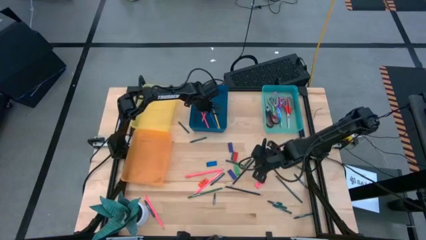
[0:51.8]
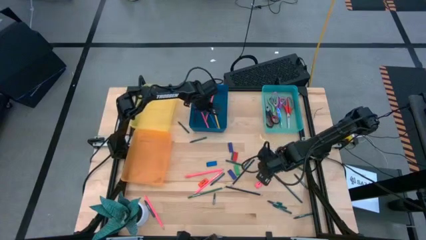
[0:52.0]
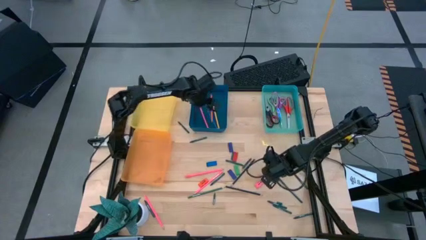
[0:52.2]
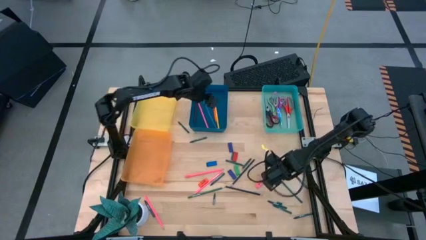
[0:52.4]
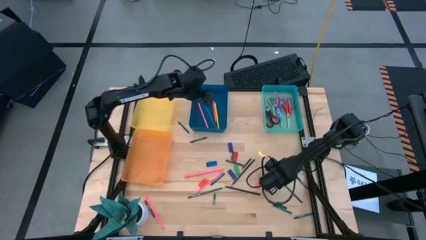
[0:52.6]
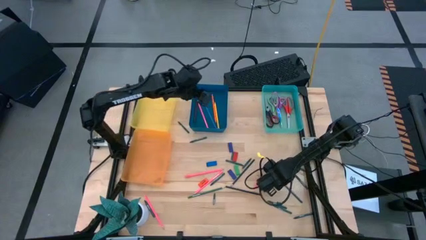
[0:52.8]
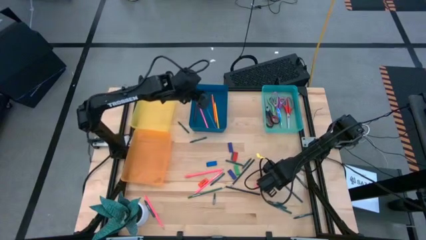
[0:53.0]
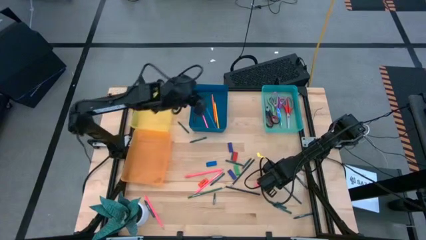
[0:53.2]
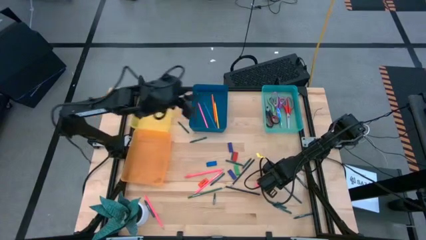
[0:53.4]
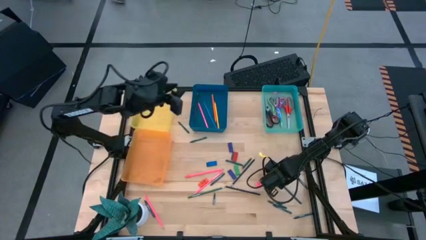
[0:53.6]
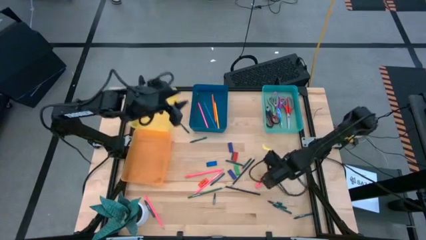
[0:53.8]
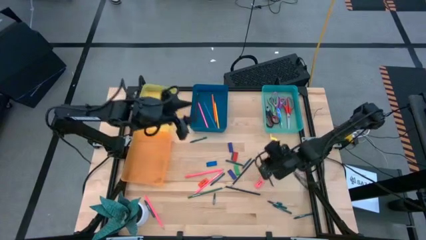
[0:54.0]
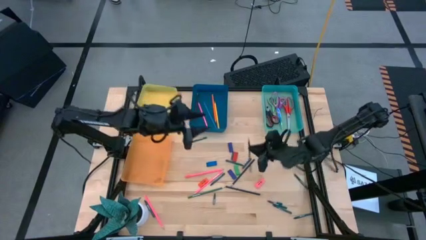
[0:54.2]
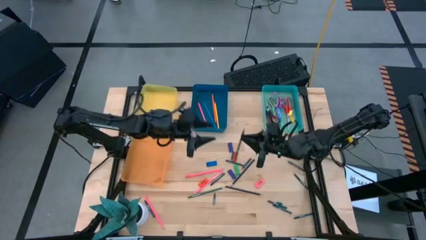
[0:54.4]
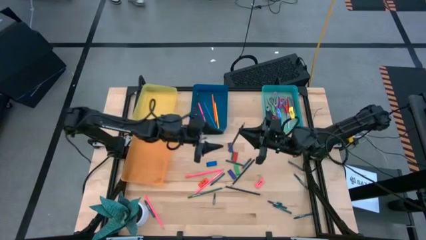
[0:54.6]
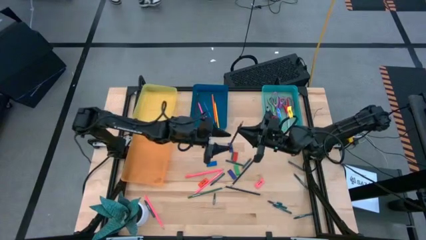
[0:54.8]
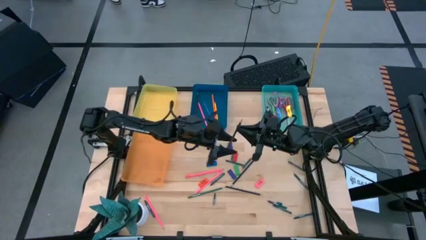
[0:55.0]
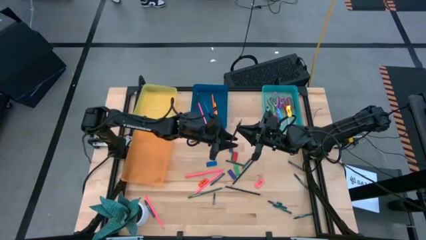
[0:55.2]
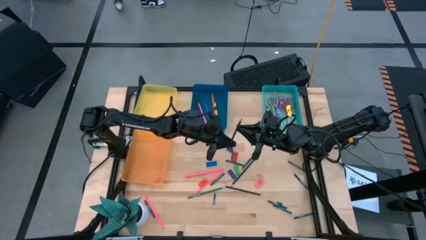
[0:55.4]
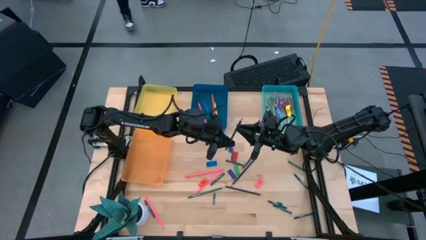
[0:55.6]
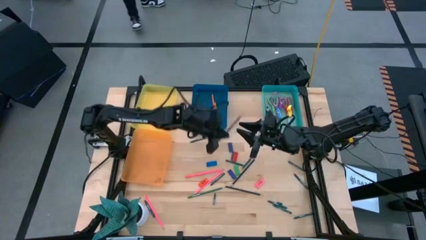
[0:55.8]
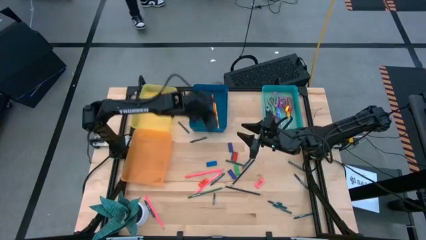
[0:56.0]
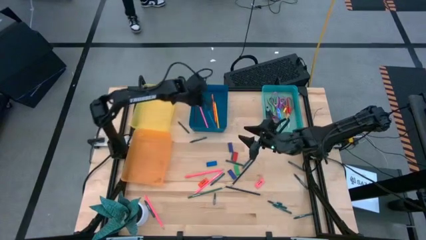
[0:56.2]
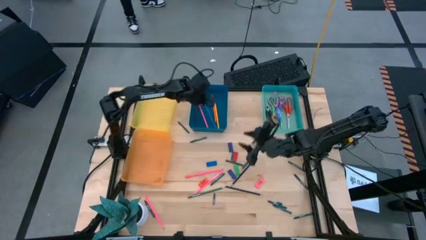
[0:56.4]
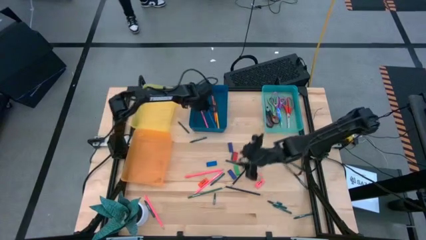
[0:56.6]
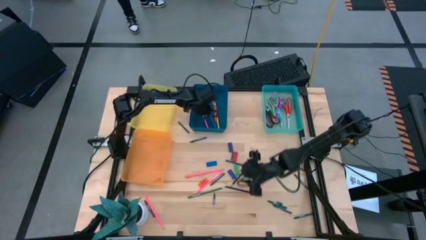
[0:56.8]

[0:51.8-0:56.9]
Task: Sort crayons/erasers/pens/pencils in bins
Put the right dark green pencil into the blue bin

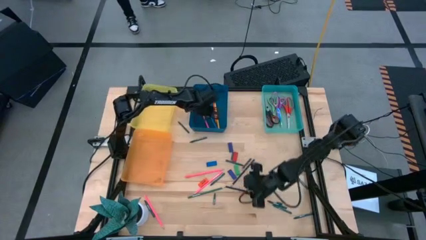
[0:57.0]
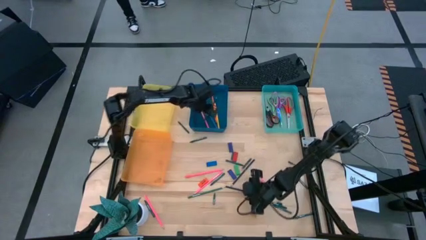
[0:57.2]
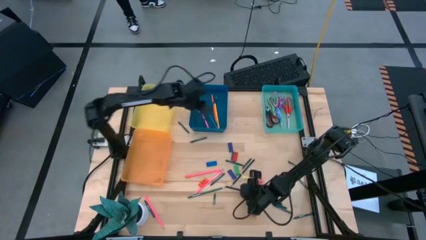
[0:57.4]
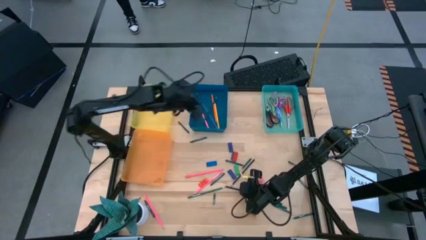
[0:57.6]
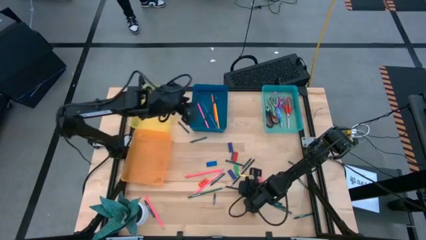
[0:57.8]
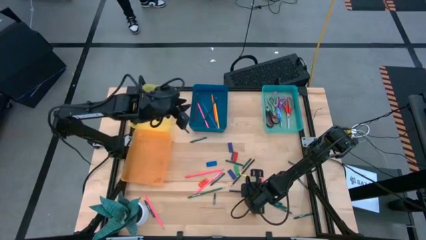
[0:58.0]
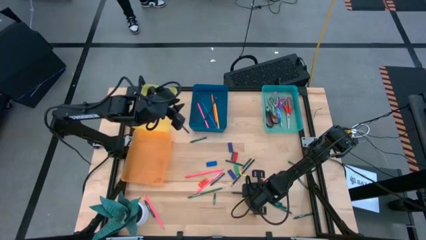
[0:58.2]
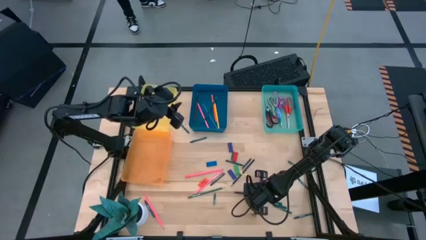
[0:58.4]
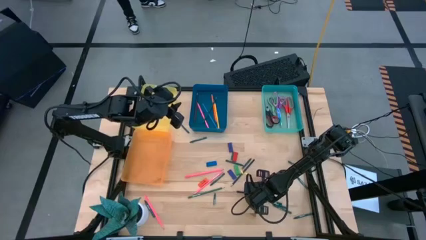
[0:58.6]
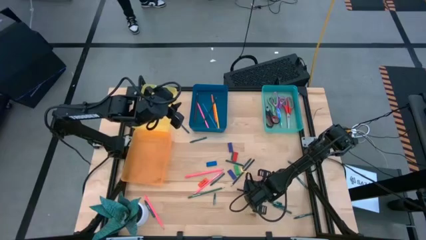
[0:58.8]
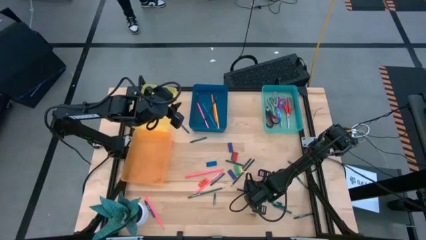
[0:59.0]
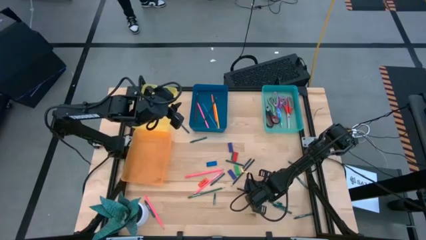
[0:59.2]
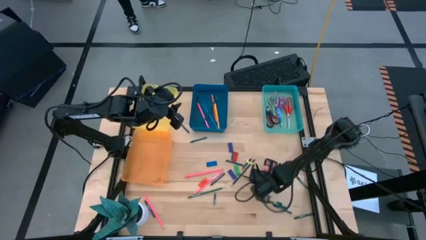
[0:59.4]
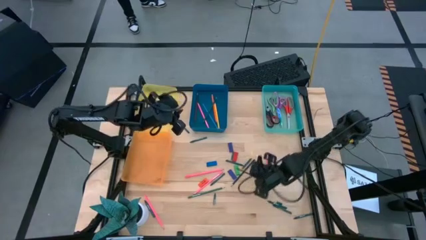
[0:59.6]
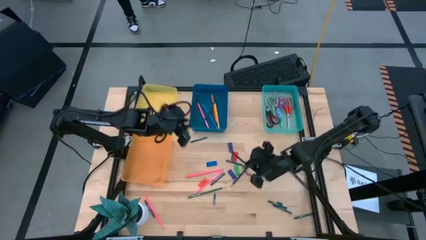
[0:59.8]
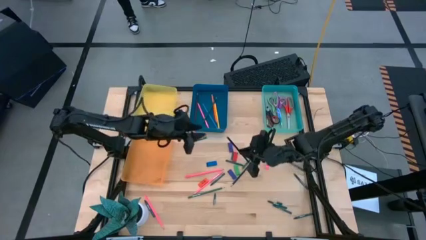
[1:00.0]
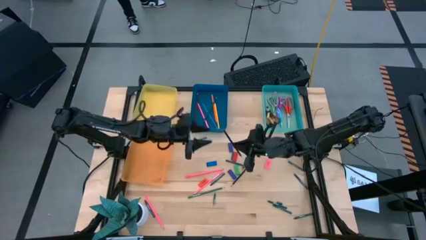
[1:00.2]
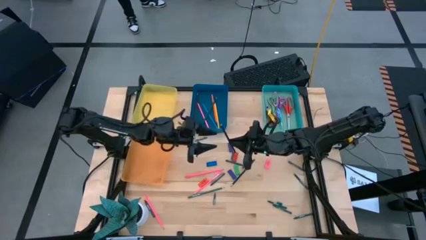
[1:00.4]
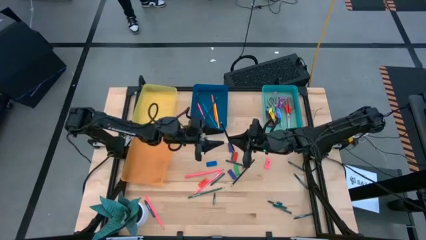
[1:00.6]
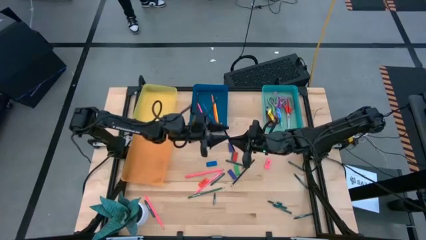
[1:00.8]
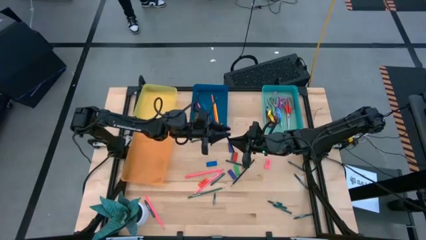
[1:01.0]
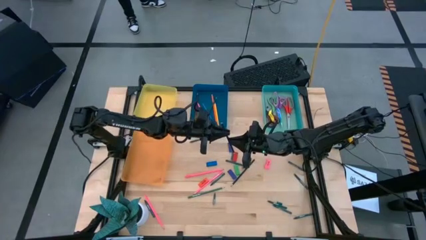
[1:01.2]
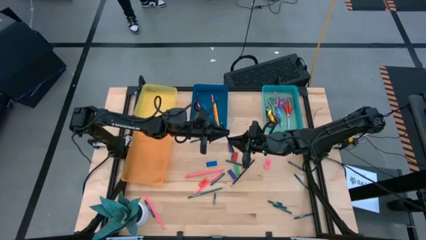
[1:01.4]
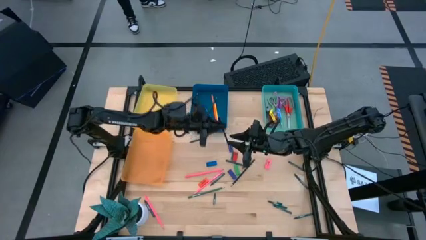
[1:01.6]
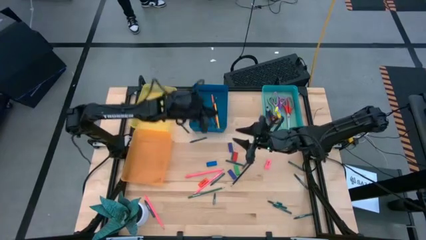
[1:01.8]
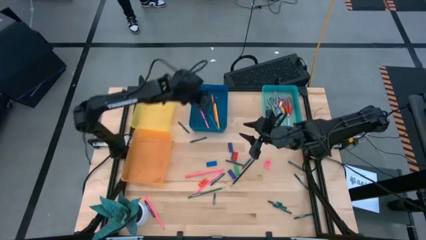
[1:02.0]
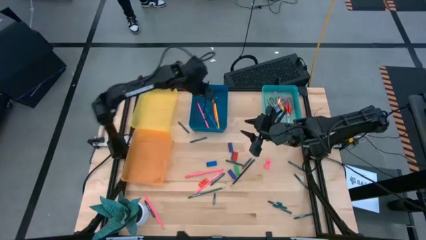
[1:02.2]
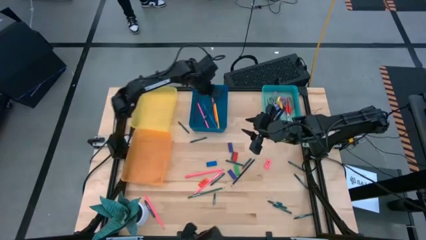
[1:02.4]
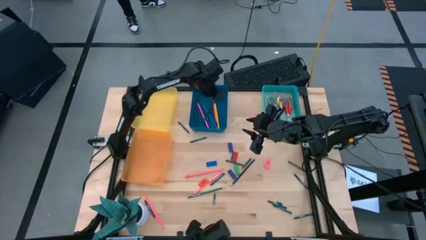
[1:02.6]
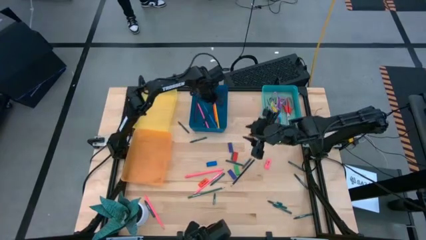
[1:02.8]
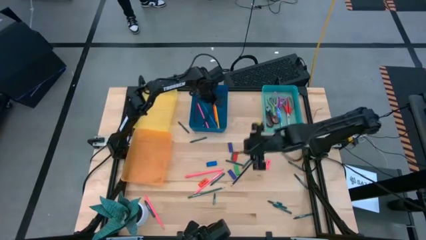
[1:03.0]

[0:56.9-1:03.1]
Put the bottom dark blue pencil into the blue bin

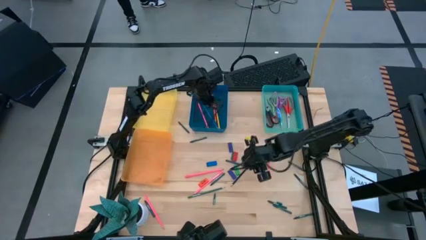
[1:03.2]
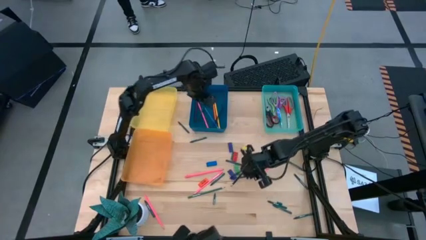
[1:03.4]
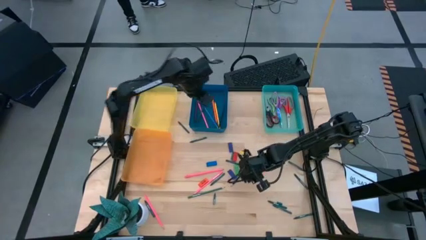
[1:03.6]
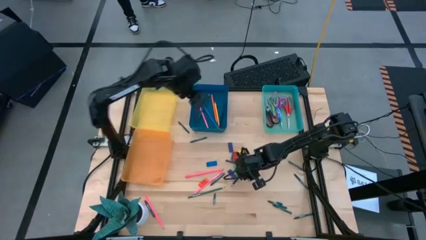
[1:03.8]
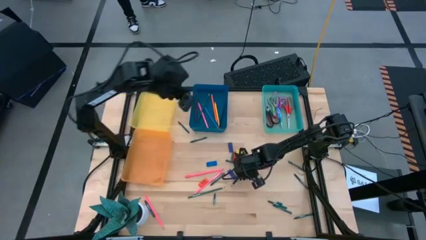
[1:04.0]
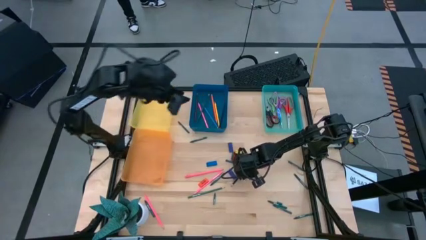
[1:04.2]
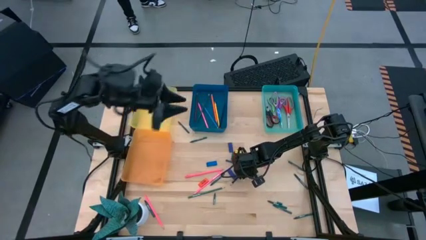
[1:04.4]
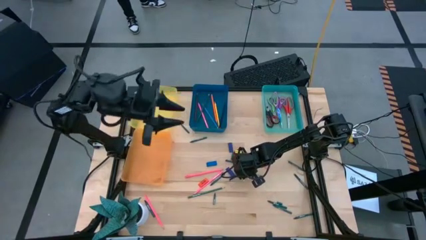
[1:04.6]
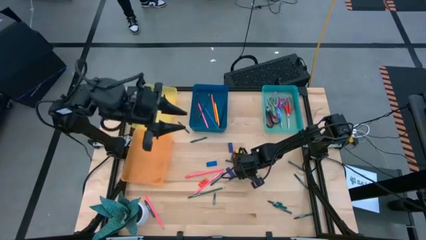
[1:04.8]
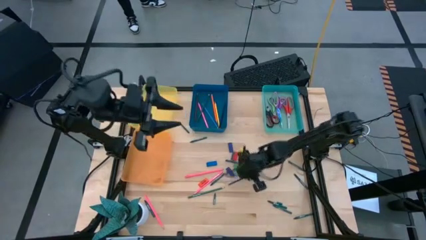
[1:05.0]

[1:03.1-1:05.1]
Put the dark blue pencil into the blue bin

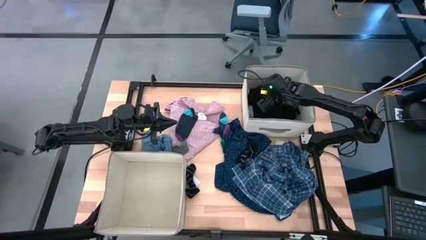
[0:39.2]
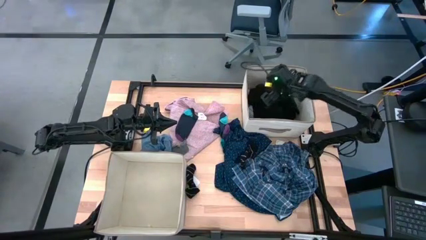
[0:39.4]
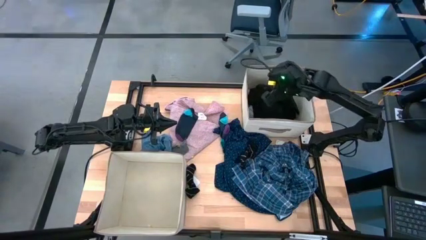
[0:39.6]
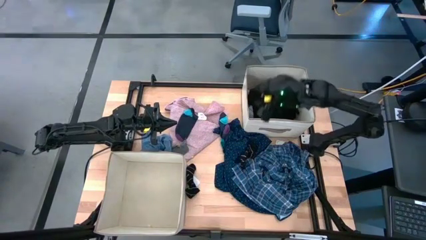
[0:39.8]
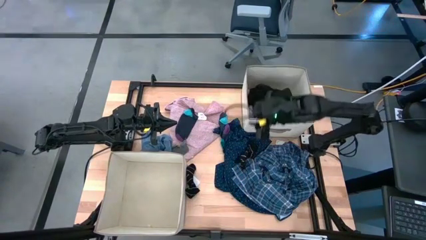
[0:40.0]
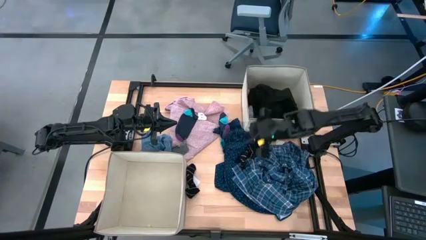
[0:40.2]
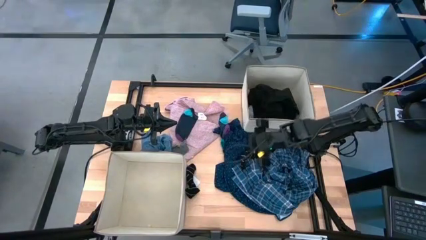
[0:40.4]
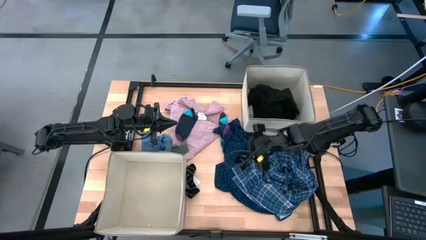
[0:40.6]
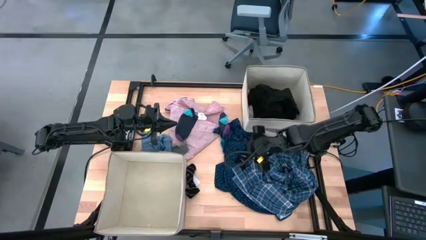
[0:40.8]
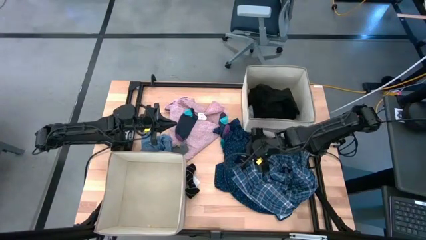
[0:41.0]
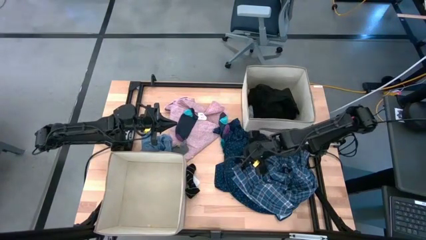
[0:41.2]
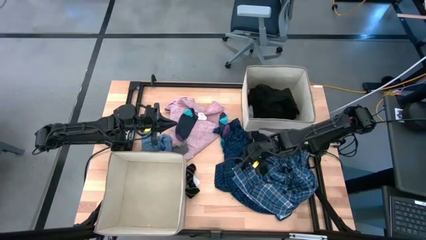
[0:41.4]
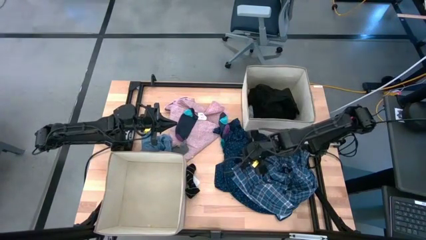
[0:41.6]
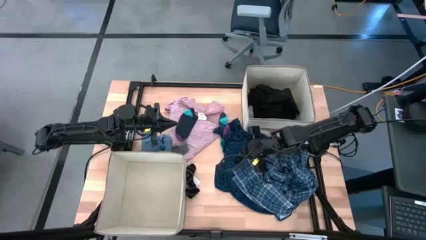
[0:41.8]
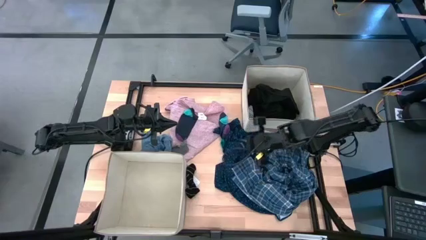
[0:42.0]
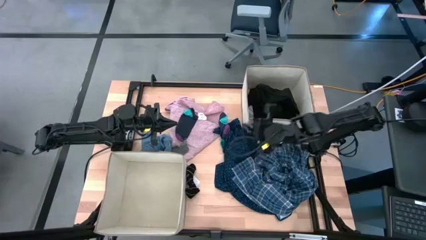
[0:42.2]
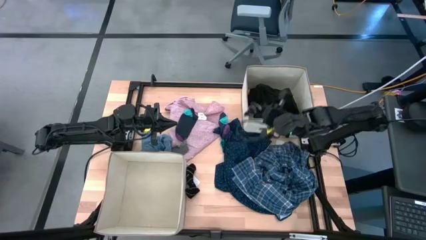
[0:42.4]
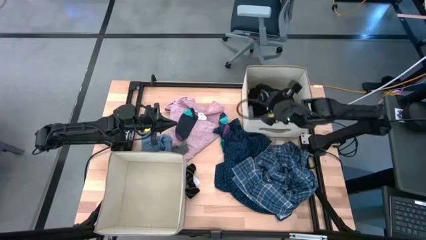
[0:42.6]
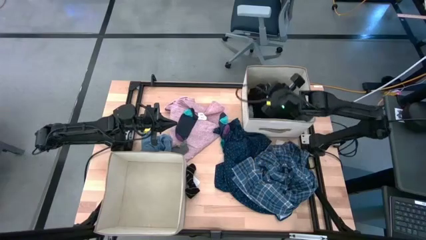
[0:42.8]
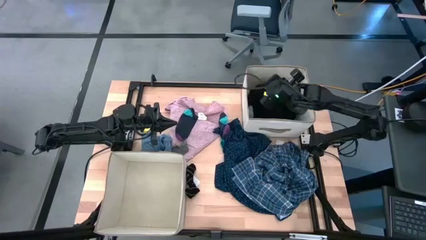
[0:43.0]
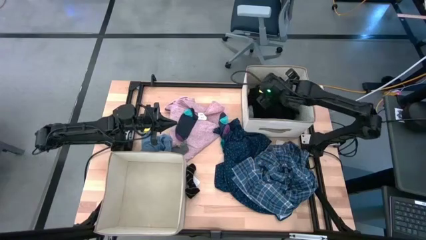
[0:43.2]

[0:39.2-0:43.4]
Task: Sort clothes
Put the black striped sock into the top white laundry organizer
